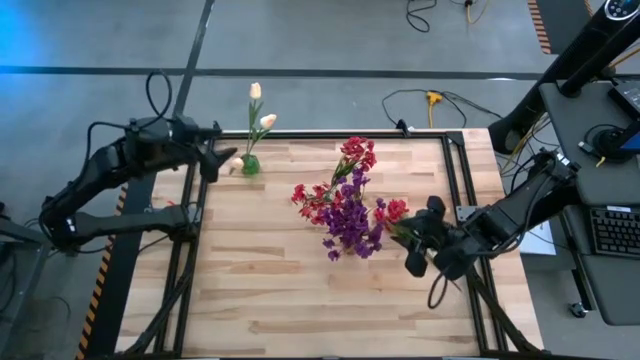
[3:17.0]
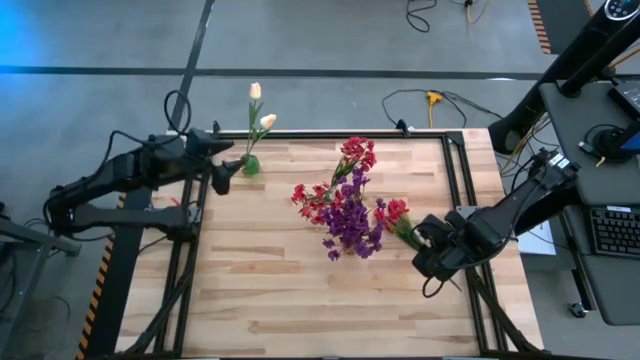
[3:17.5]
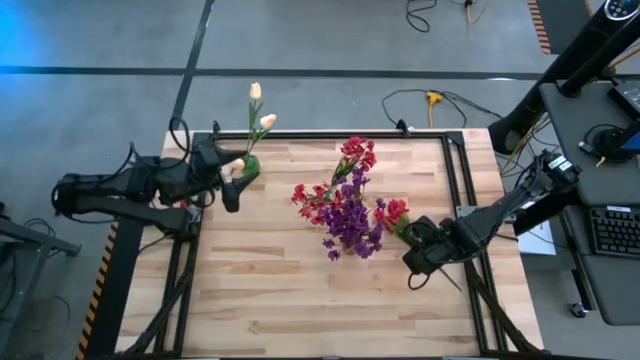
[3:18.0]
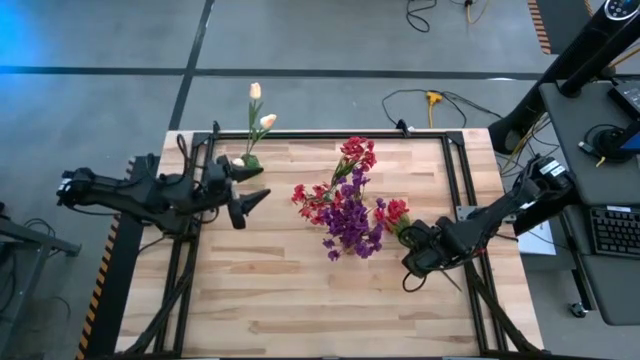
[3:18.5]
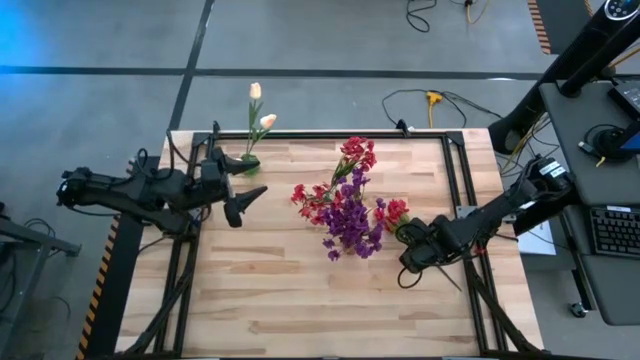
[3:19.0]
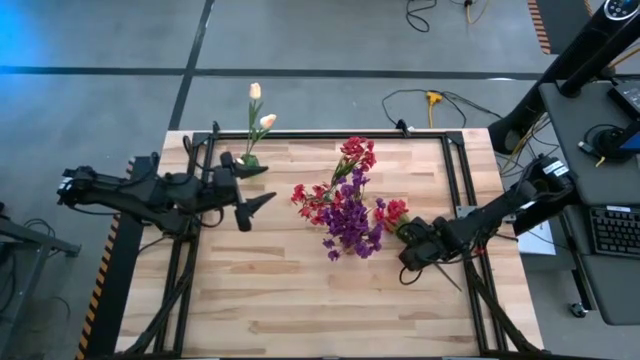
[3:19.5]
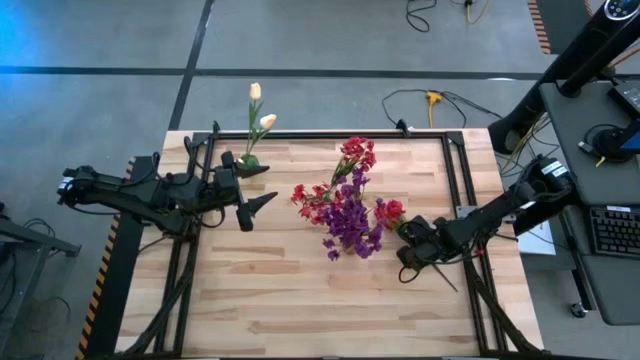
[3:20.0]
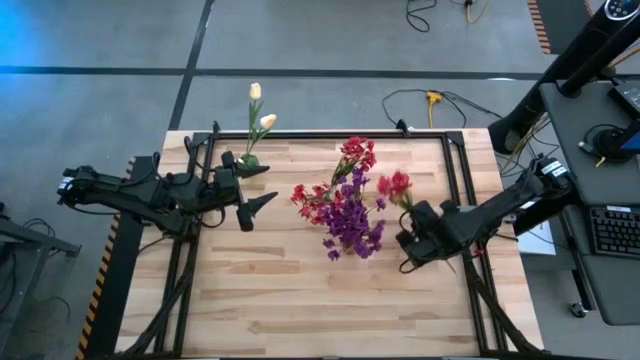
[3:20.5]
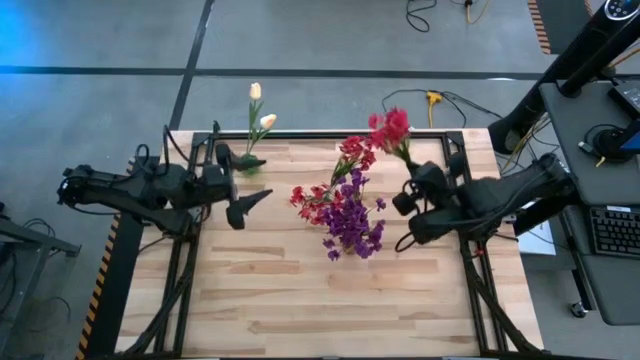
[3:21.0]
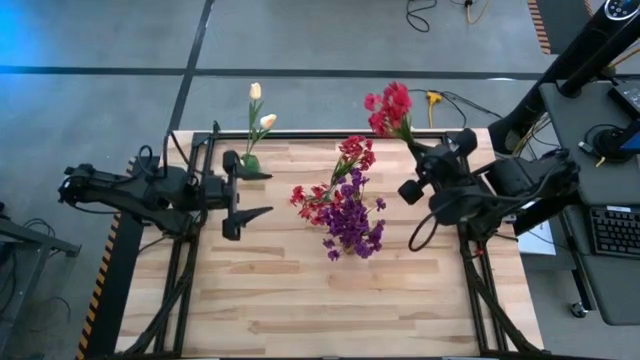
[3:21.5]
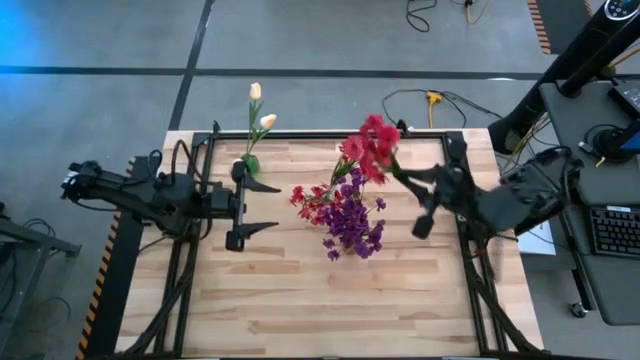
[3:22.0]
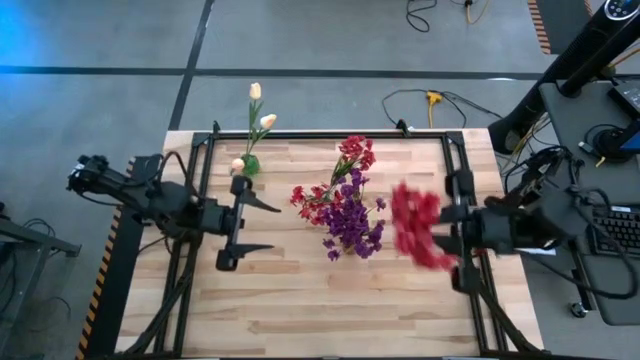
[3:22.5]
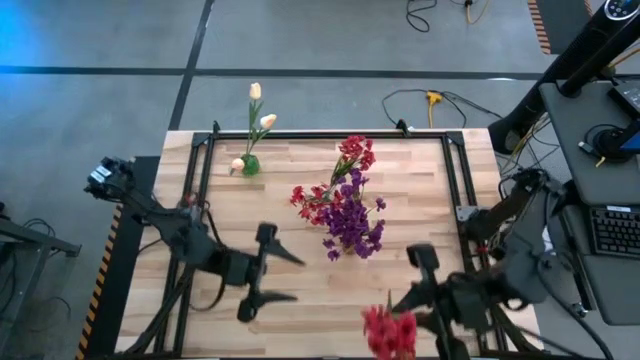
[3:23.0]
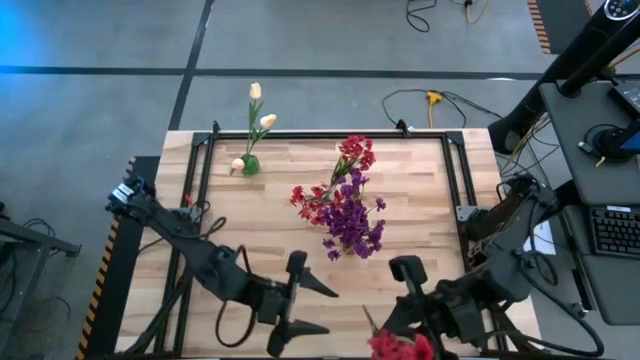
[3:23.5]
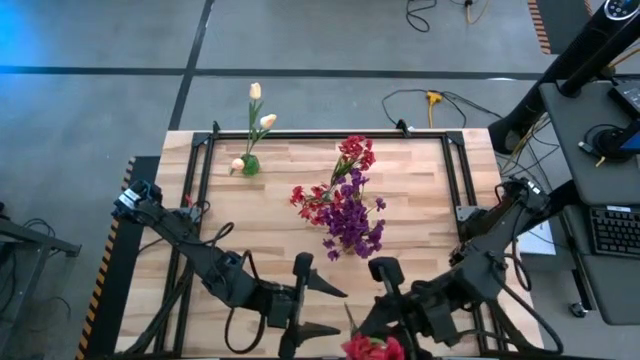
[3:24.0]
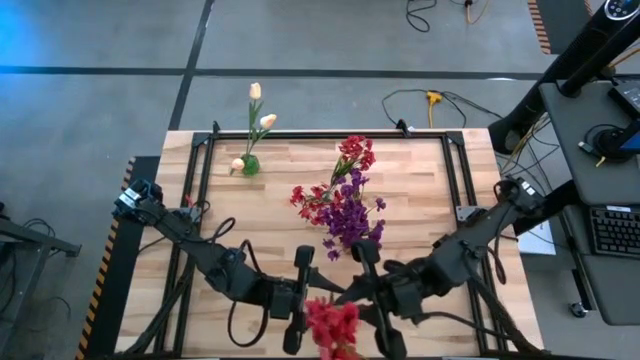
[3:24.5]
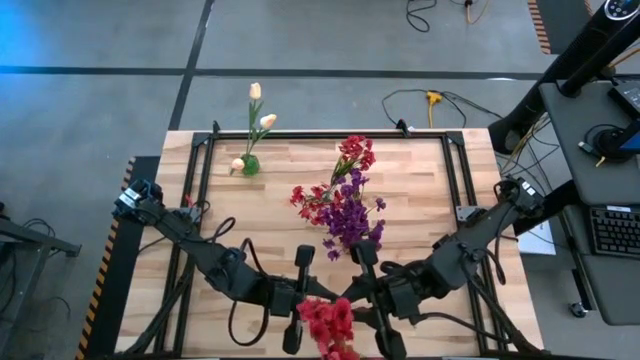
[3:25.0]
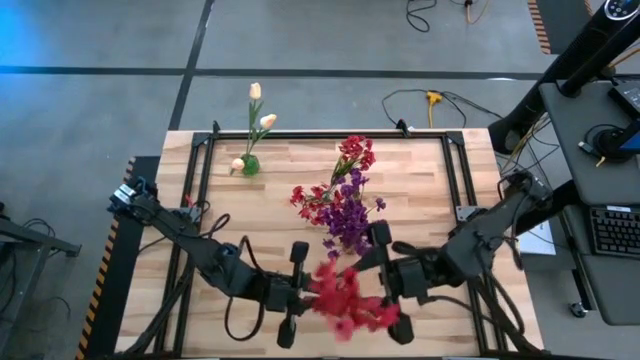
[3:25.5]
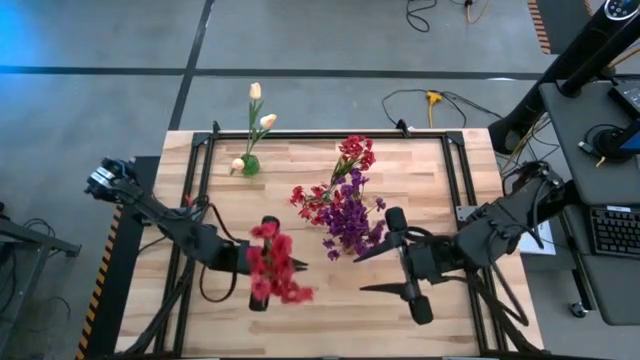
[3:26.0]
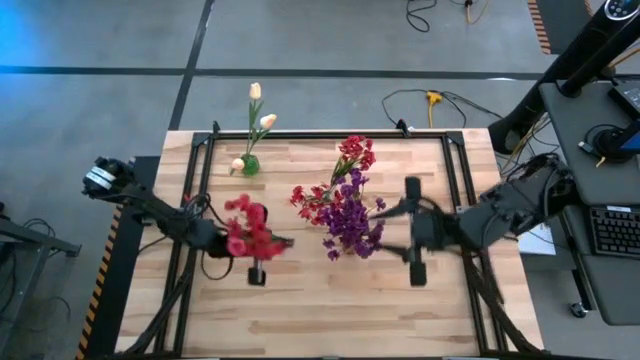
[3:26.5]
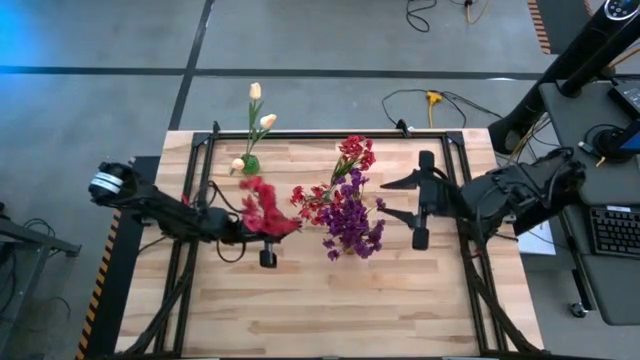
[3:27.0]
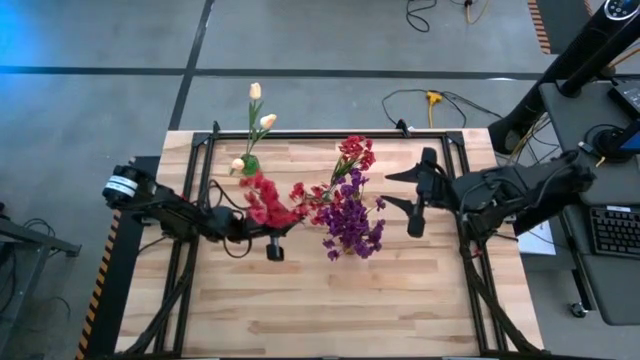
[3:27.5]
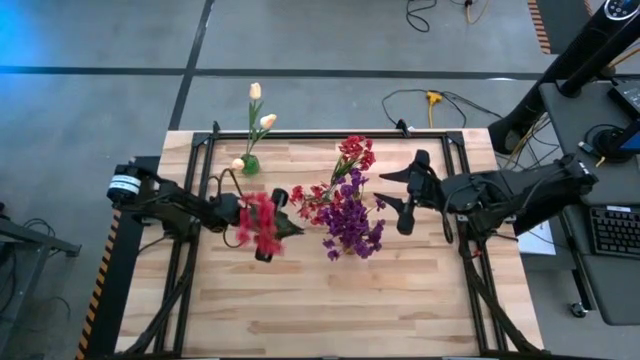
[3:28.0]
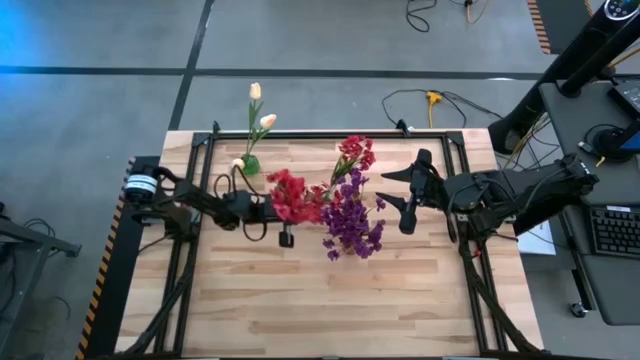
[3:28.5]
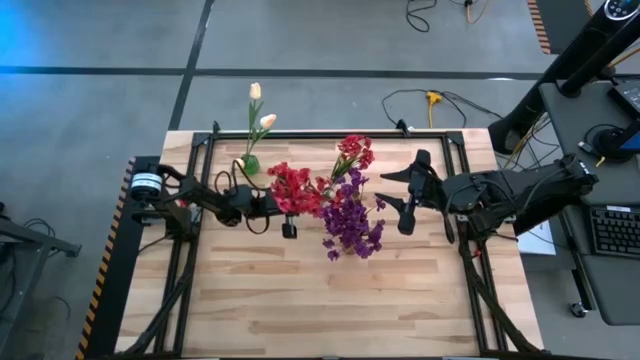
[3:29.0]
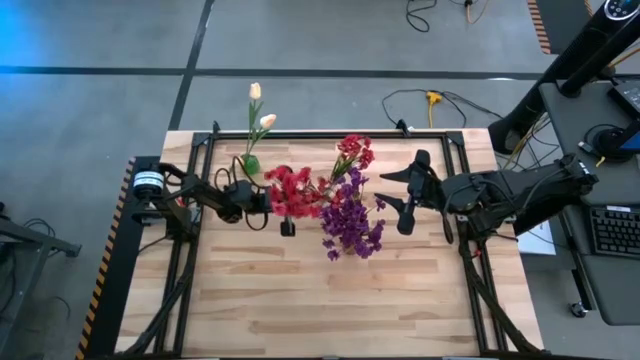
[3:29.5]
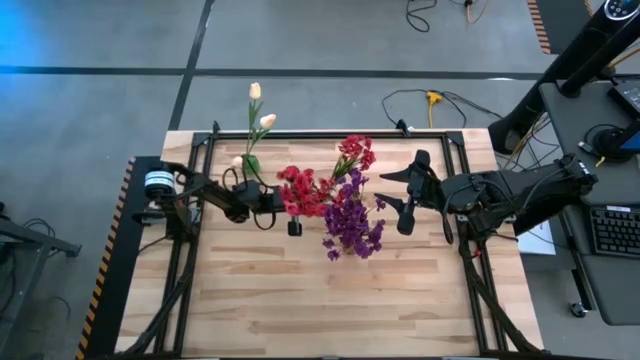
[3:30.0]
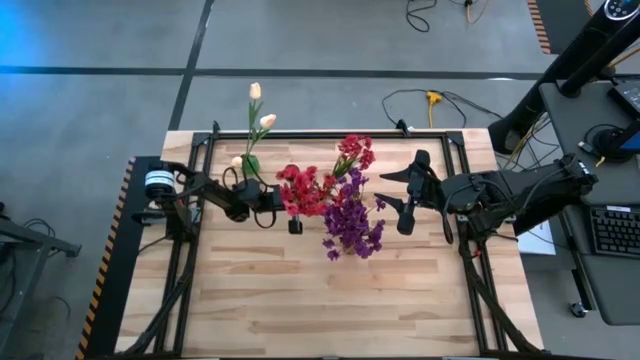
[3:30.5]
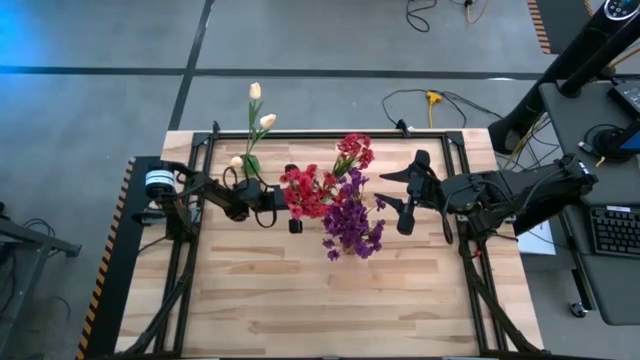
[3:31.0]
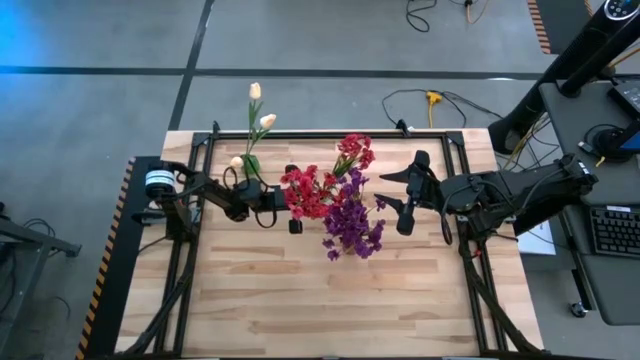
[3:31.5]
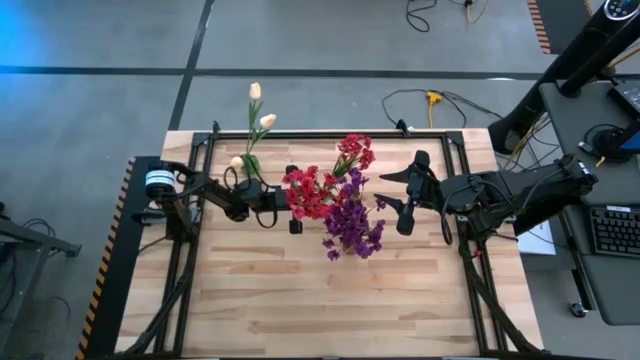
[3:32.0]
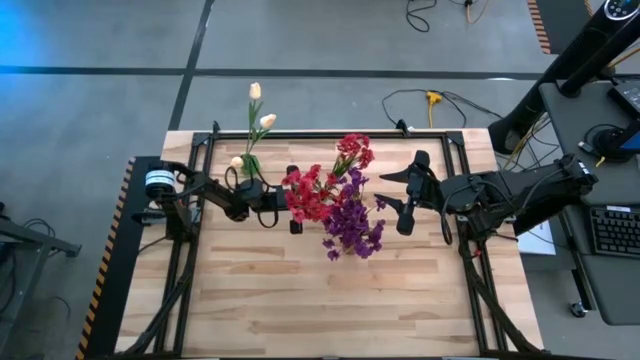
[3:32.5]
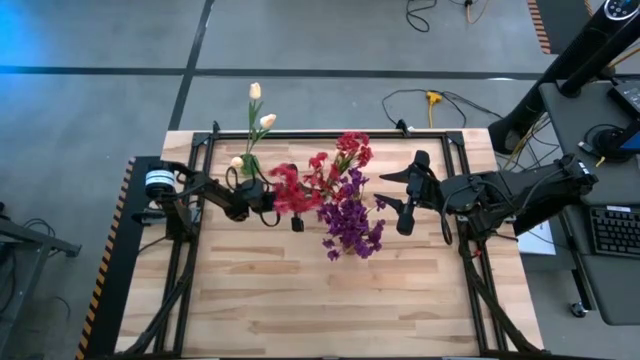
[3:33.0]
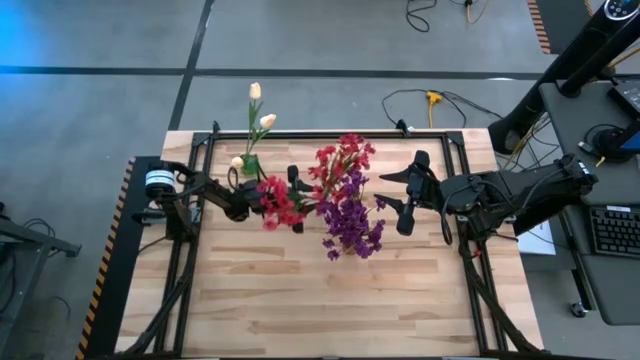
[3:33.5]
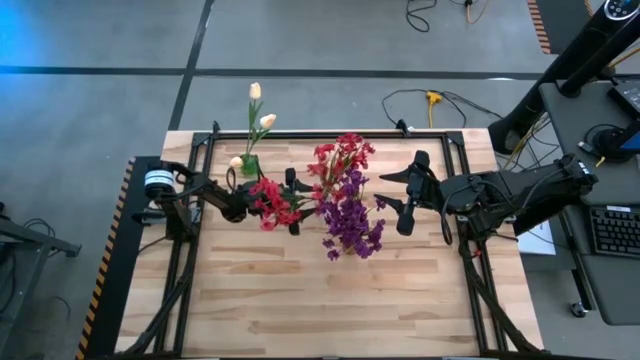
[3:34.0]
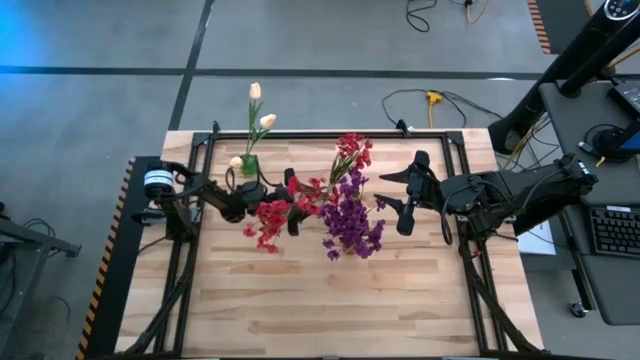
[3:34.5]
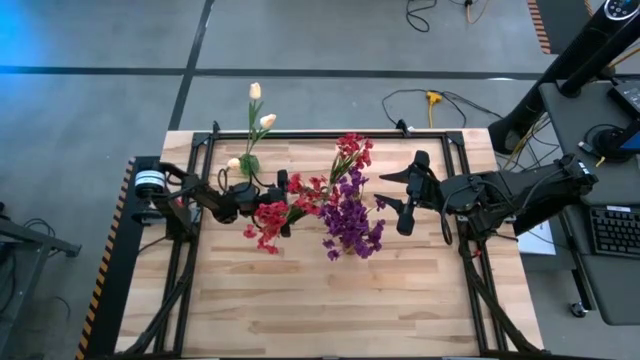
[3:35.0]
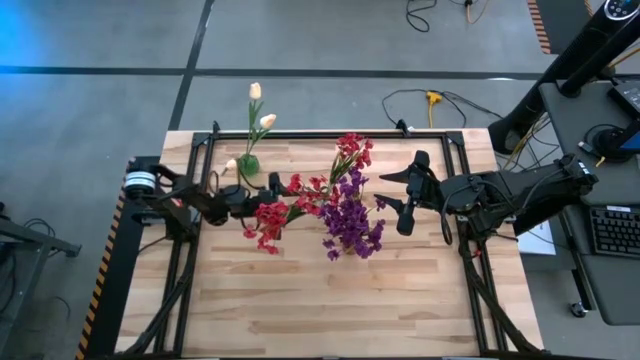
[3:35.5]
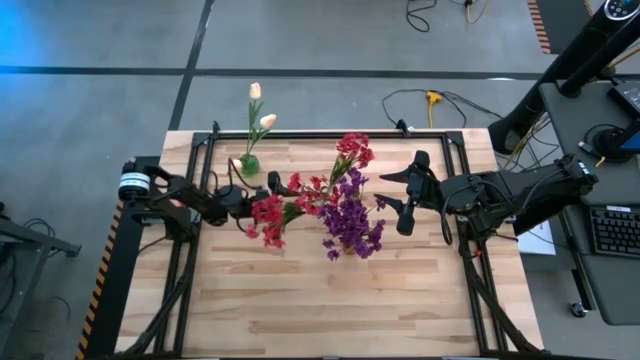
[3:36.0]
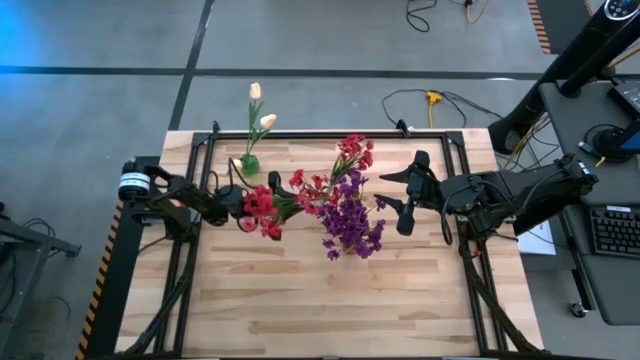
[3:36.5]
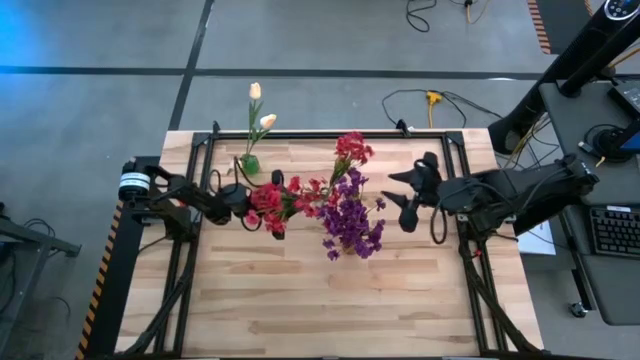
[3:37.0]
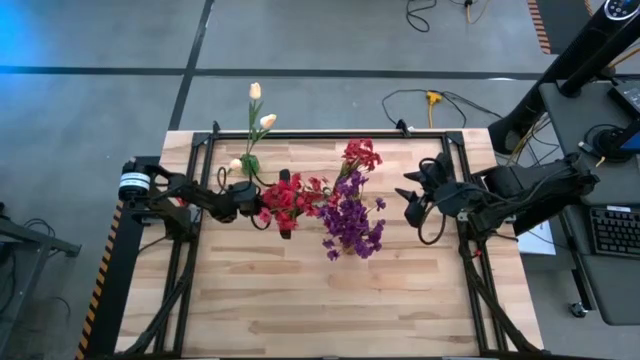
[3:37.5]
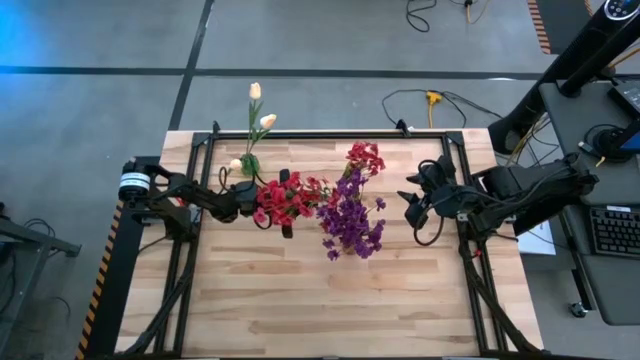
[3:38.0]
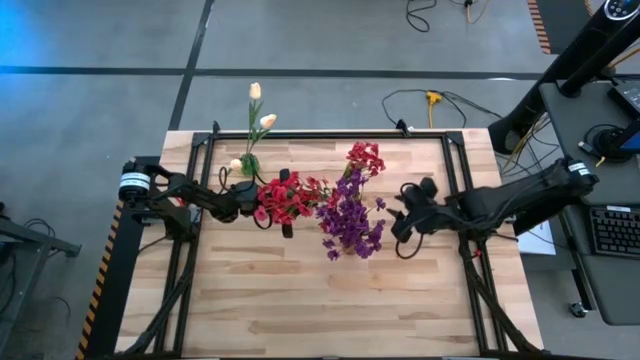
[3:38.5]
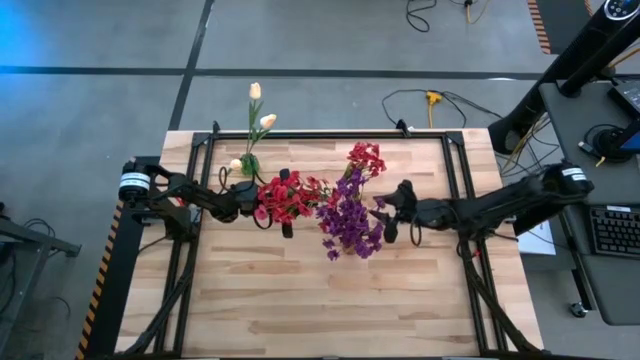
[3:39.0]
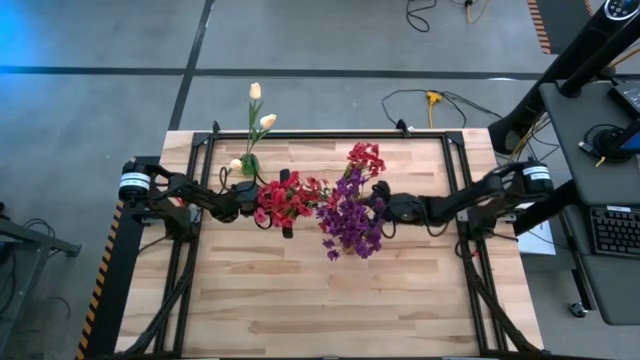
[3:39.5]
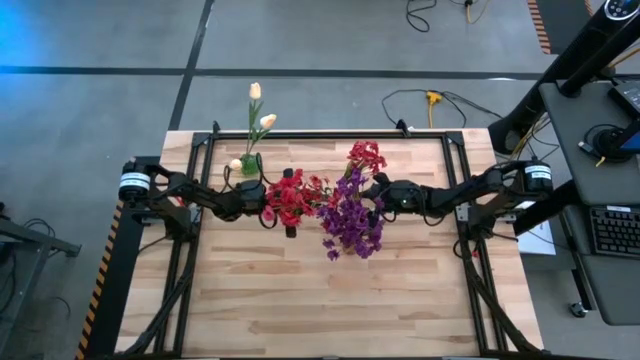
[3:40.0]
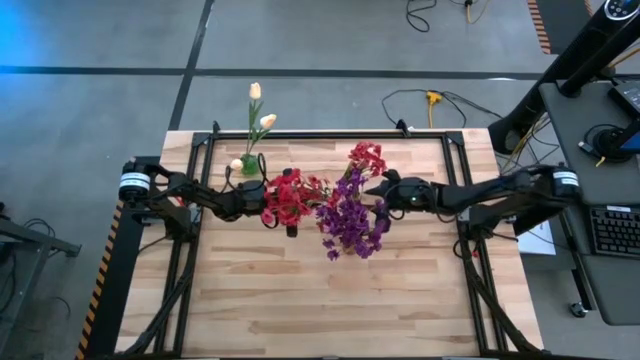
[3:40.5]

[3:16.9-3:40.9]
Task: Sort flowers into vase by color
Put the red flowers into the transparent vase
